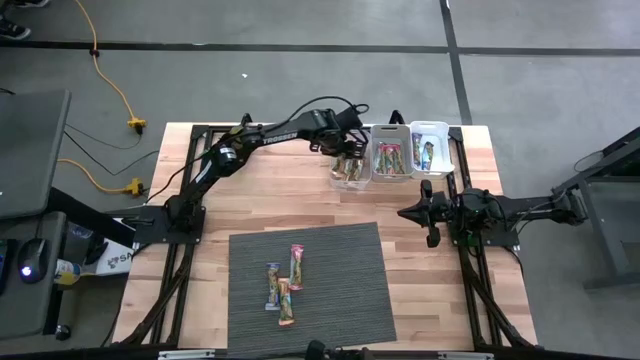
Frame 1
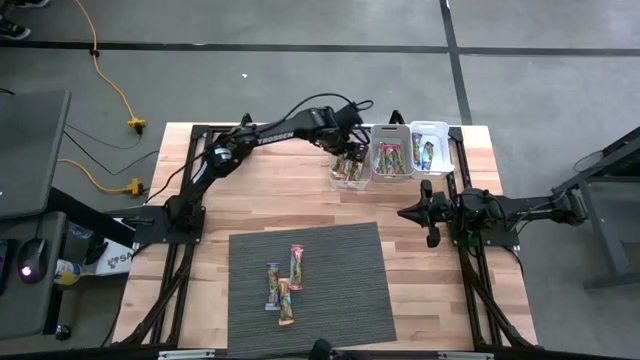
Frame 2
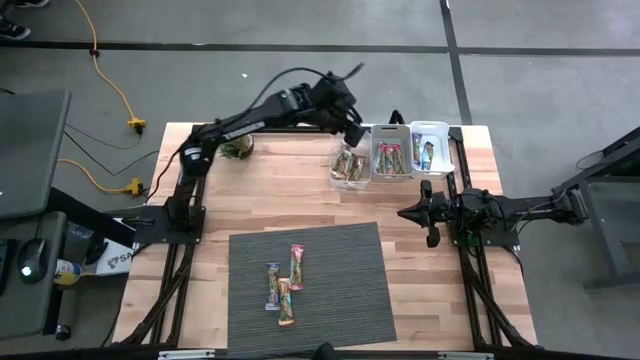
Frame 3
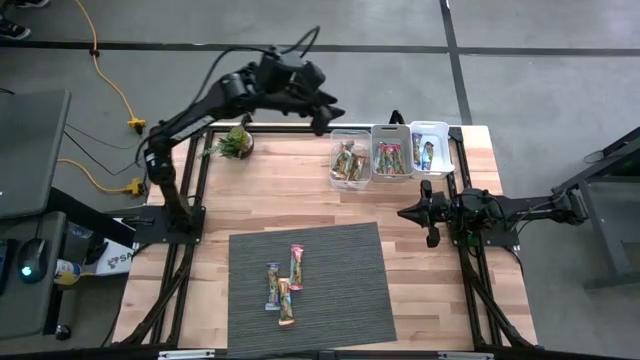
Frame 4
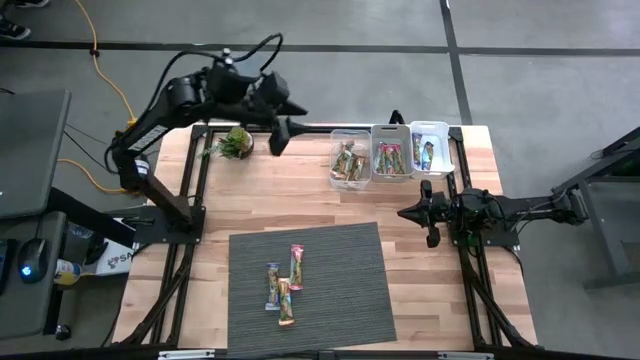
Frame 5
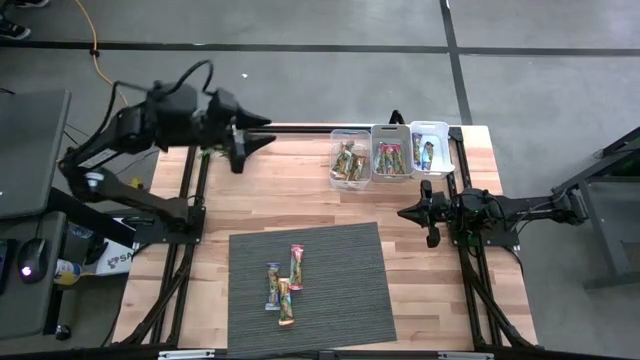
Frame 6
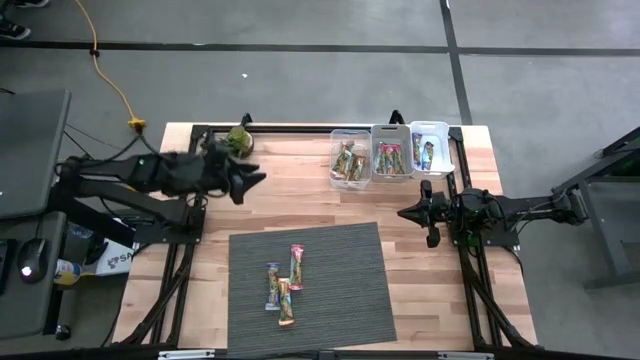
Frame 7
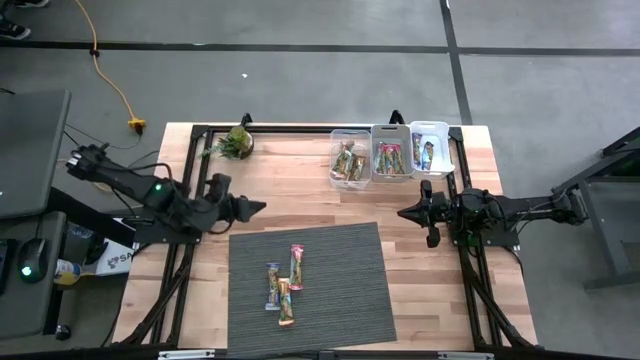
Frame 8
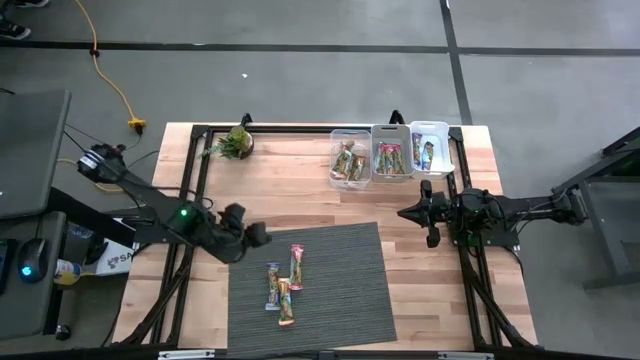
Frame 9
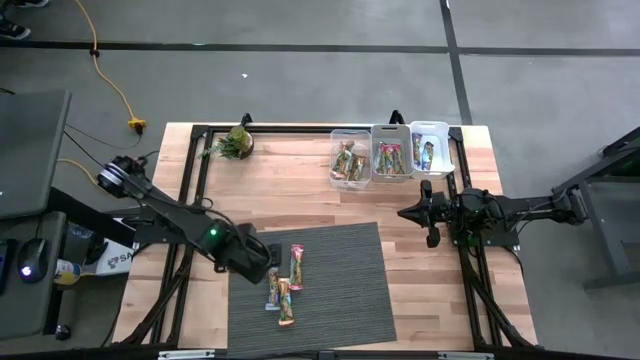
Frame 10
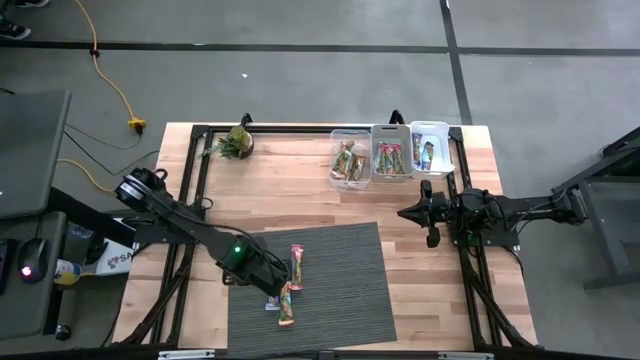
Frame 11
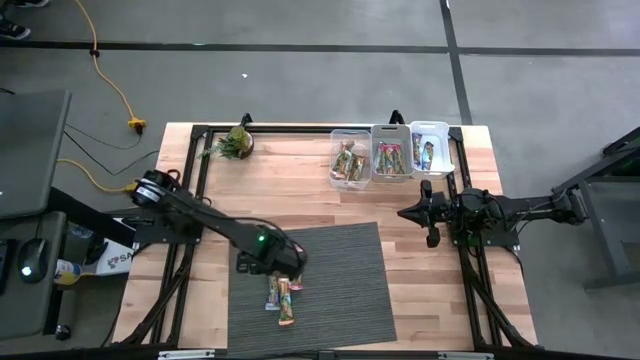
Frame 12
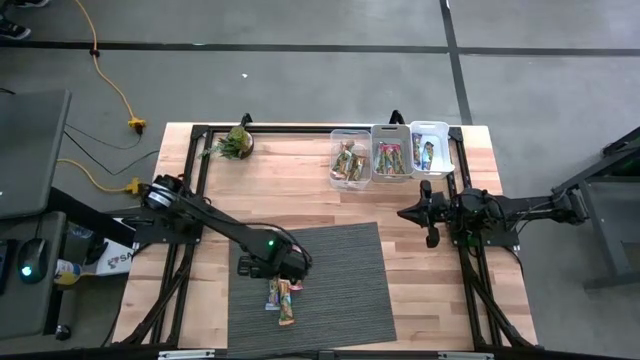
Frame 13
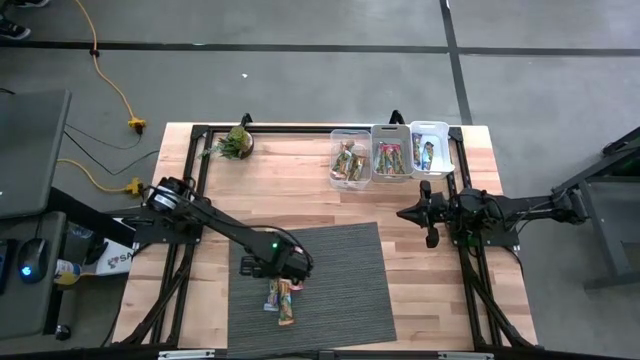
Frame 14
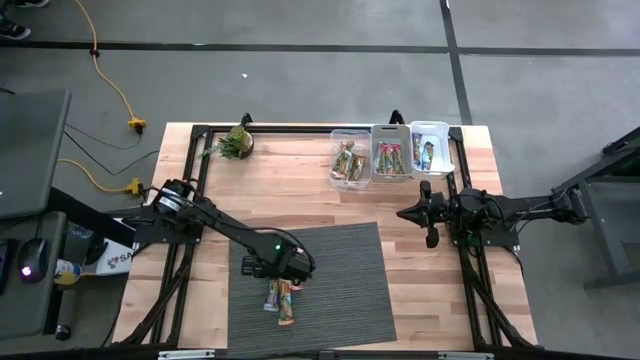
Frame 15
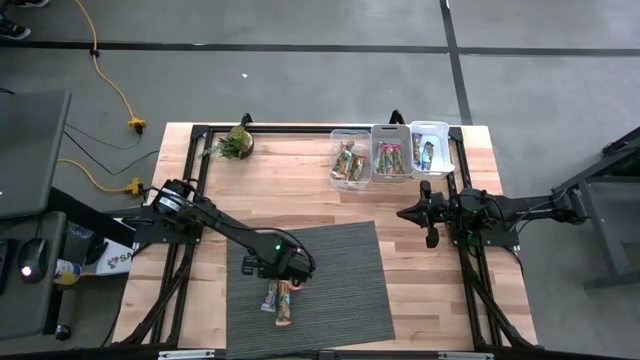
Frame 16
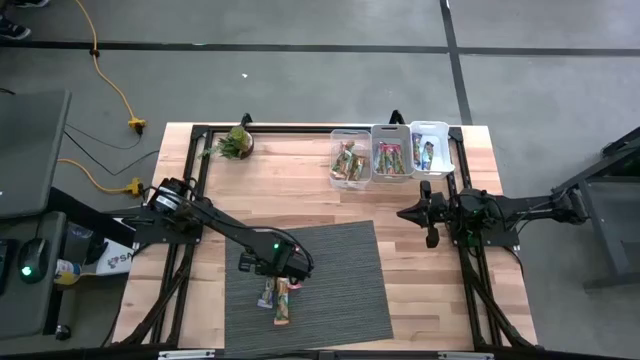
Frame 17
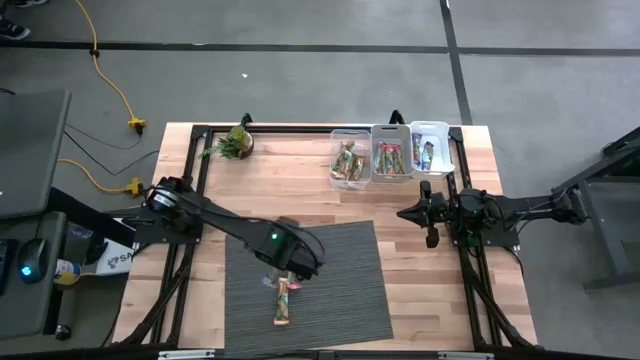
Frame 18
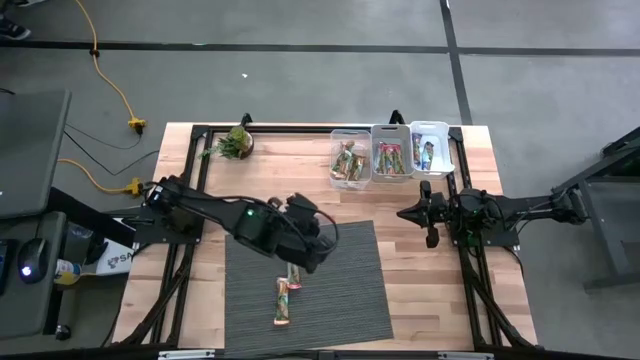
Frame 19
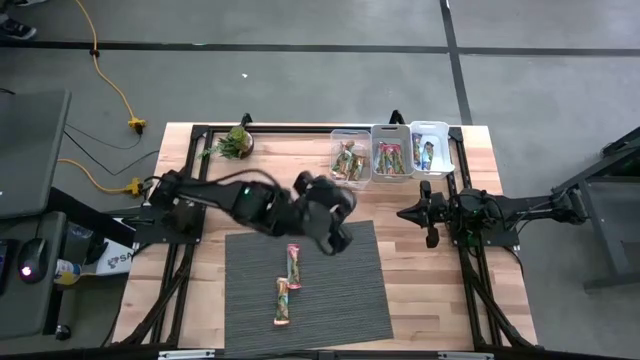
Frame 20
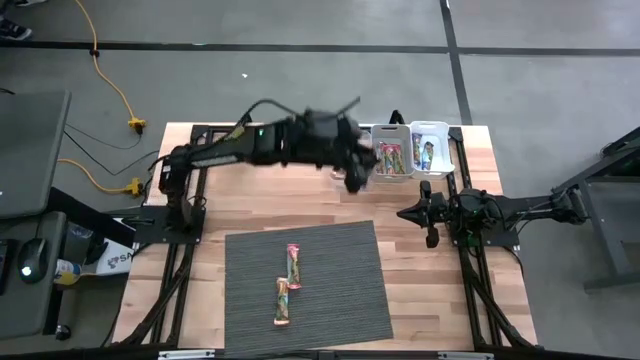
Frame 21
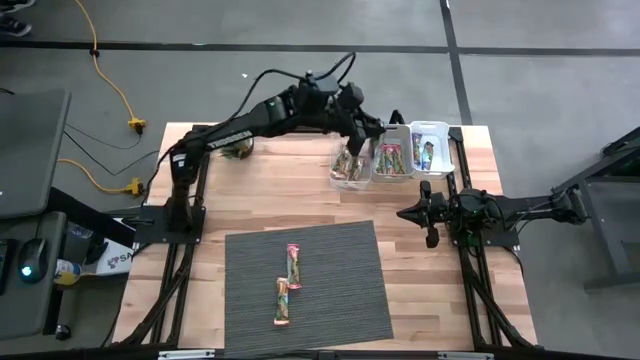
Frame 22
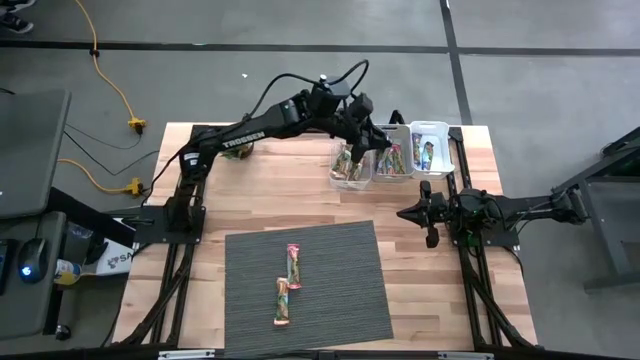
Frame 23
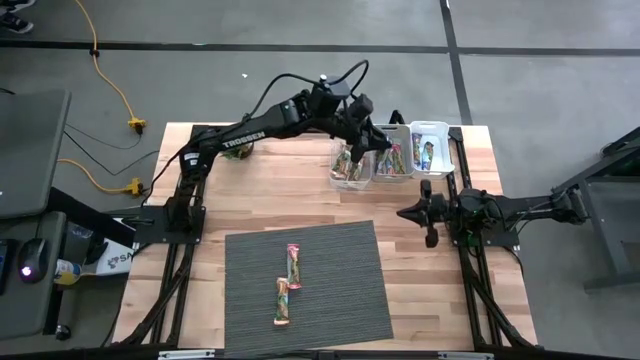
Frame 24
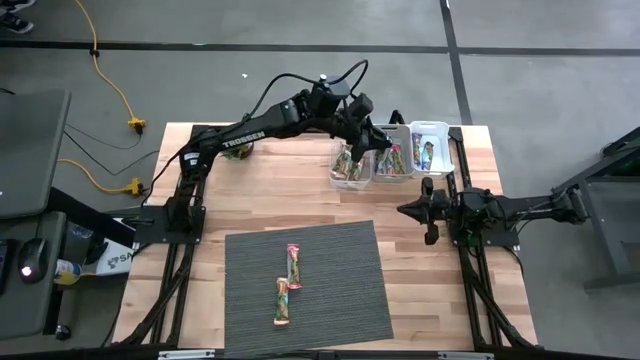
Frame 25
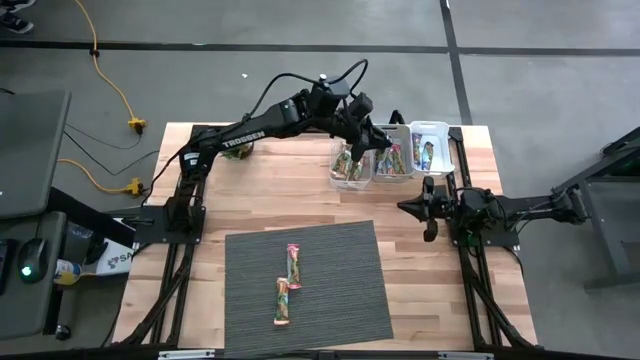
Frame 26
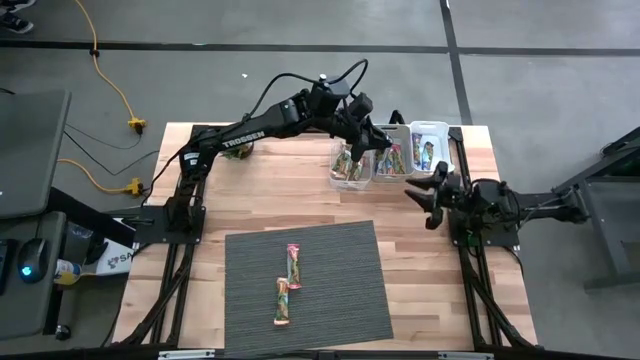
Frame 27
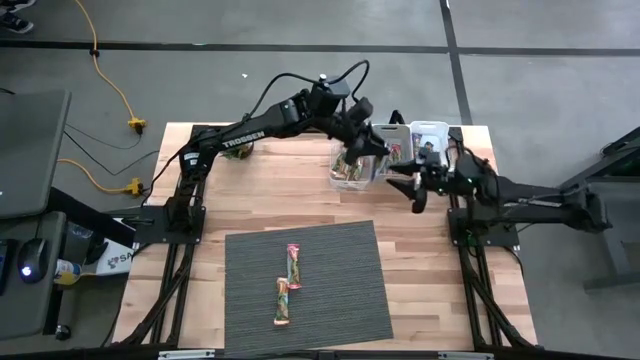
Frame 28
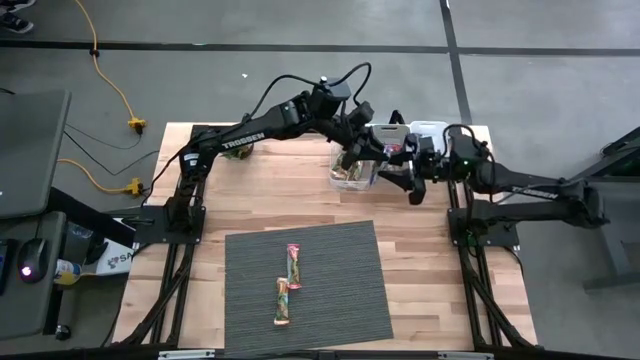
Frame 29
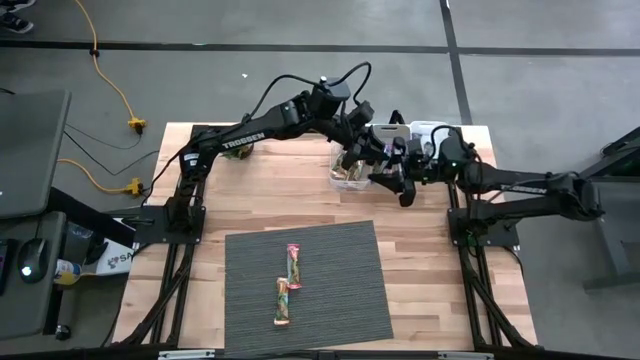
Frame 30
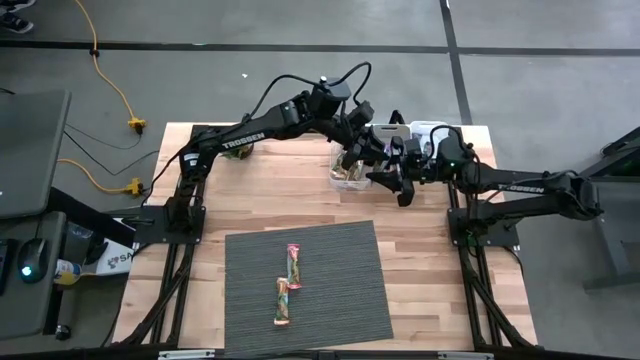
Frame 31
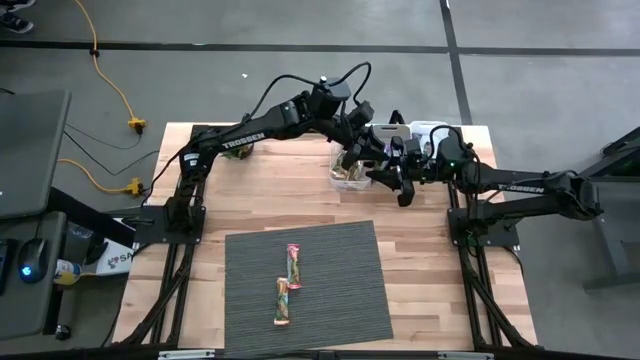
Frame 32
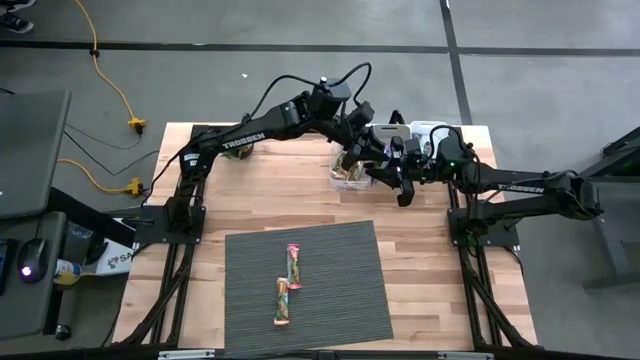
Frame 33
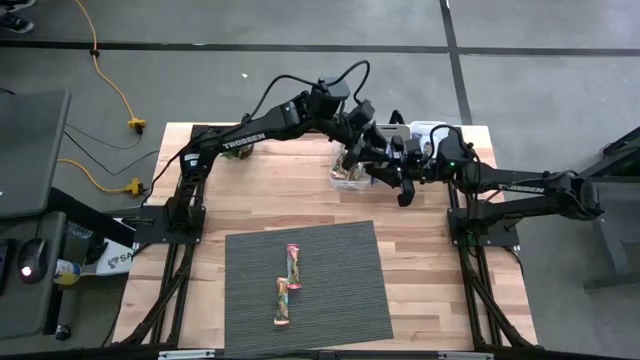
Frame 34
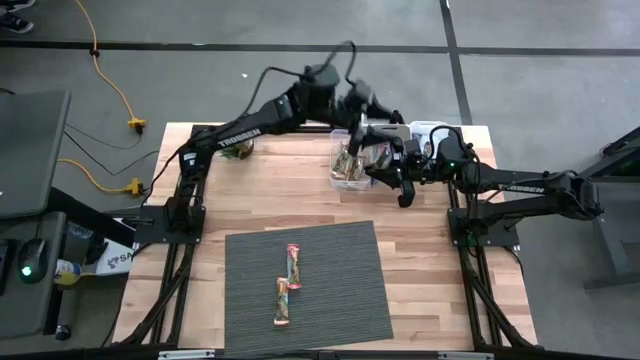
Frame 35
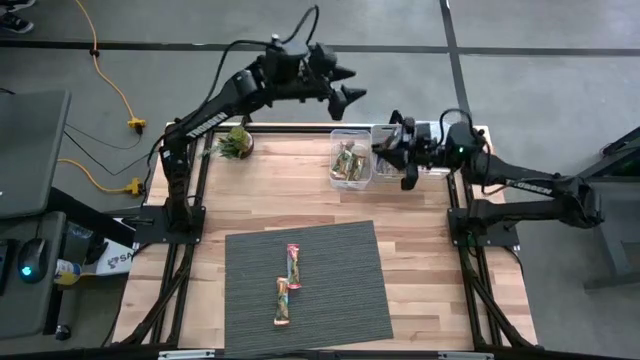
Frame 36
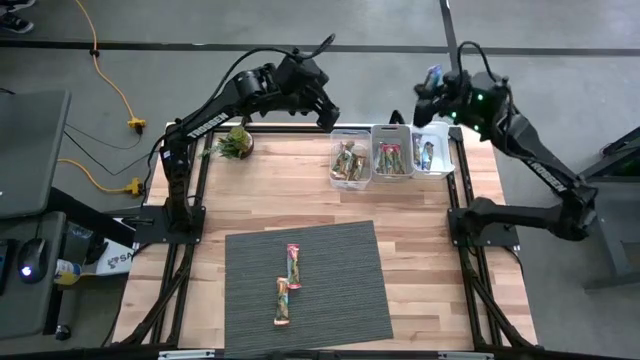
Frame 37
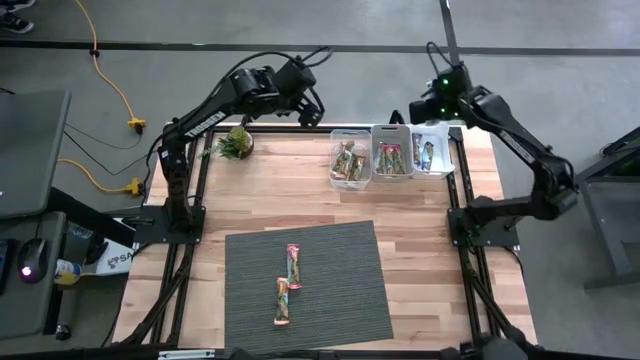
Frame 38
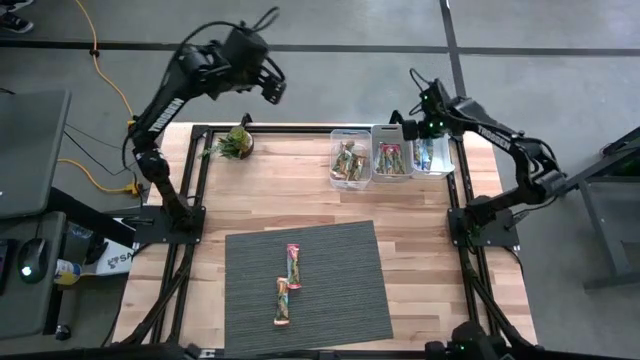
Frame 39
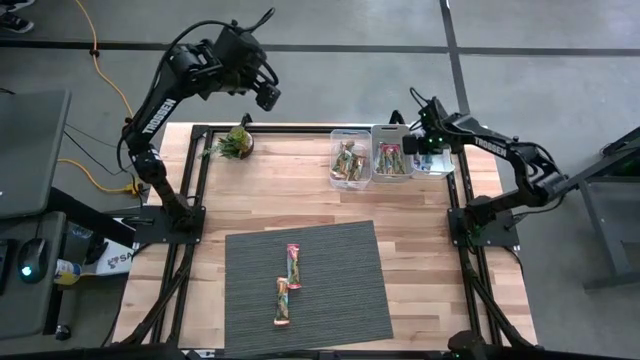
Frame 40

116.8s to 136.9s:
Task: Pick and place Granola Bars by type
Put the blue granola bar into the white bin
